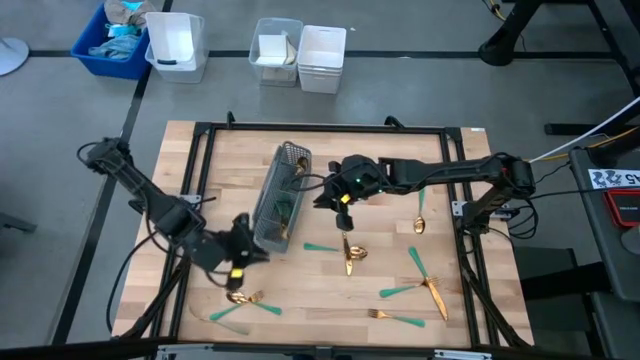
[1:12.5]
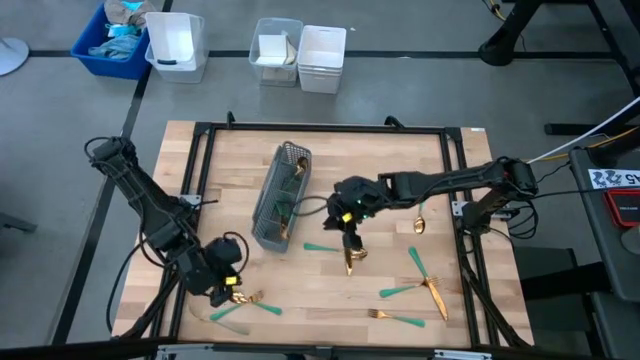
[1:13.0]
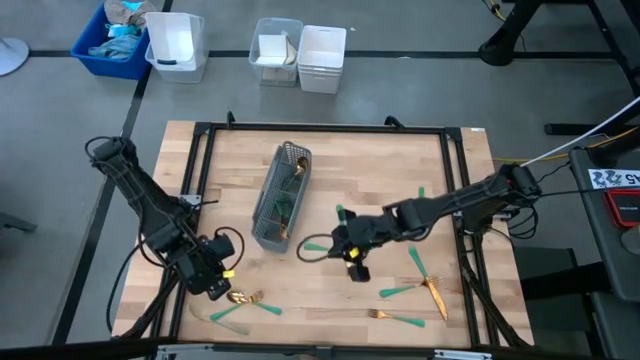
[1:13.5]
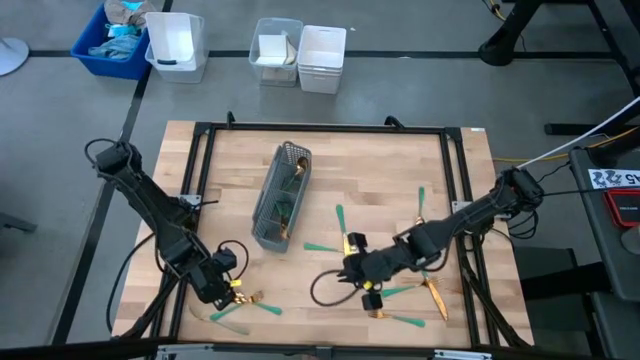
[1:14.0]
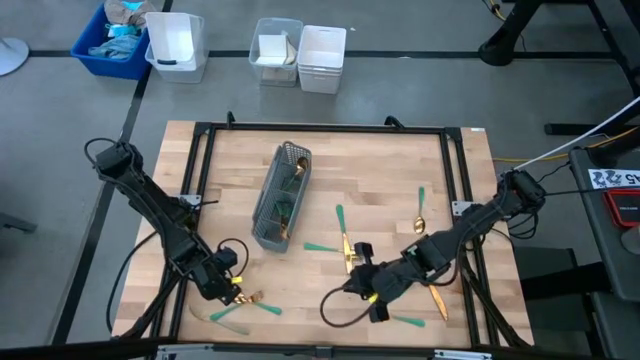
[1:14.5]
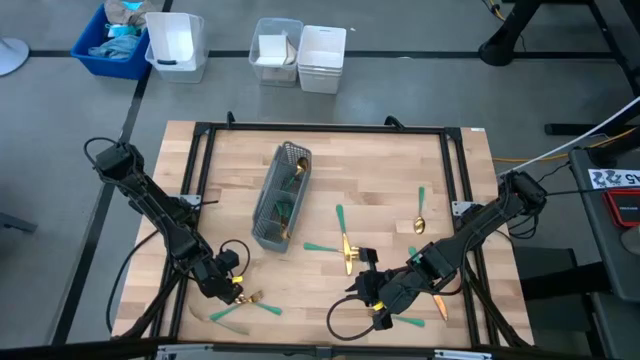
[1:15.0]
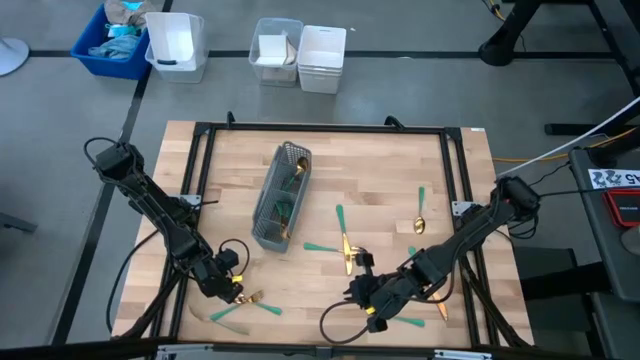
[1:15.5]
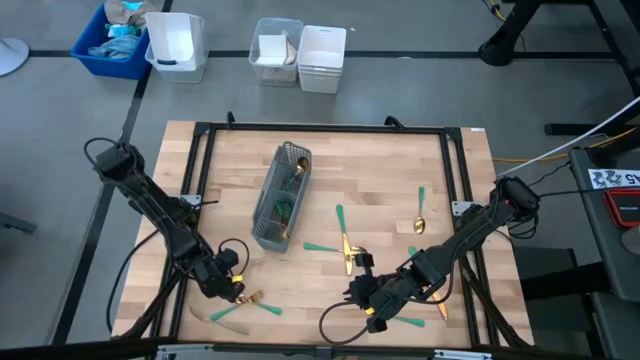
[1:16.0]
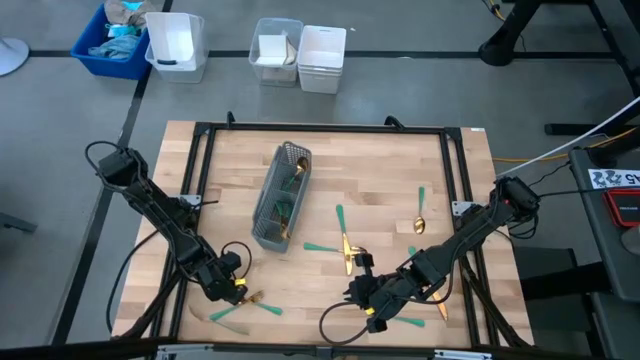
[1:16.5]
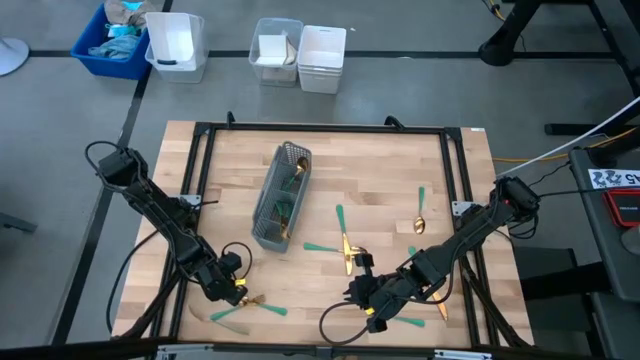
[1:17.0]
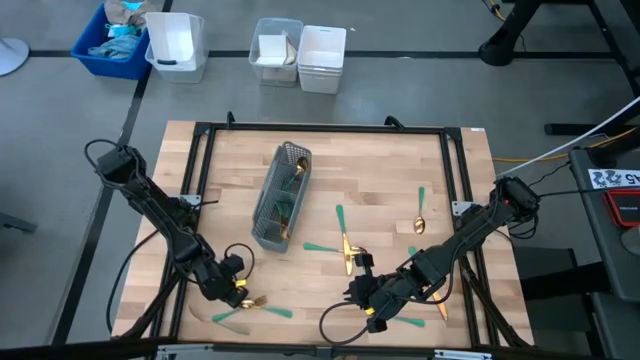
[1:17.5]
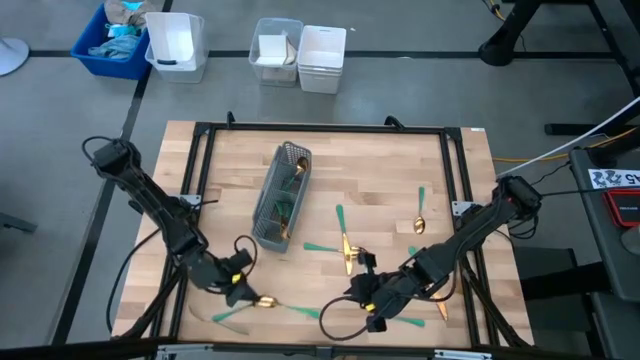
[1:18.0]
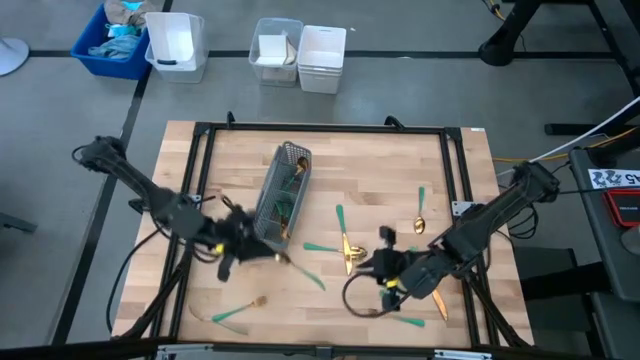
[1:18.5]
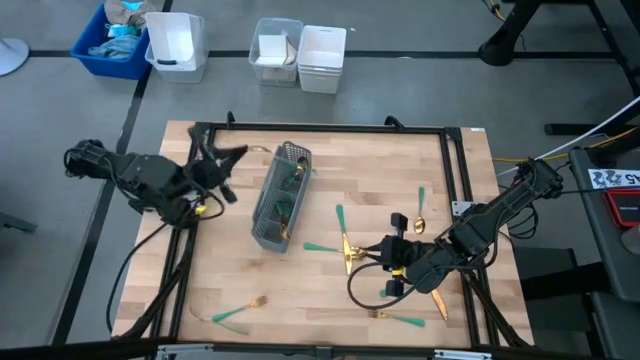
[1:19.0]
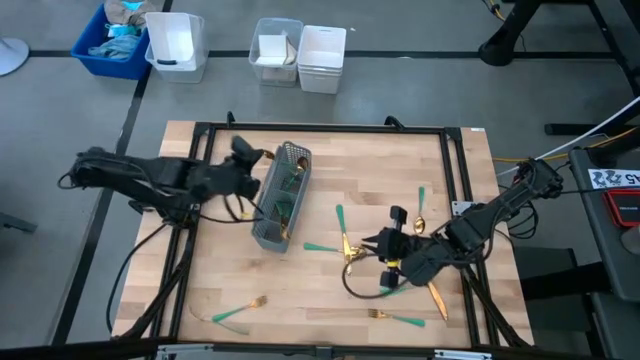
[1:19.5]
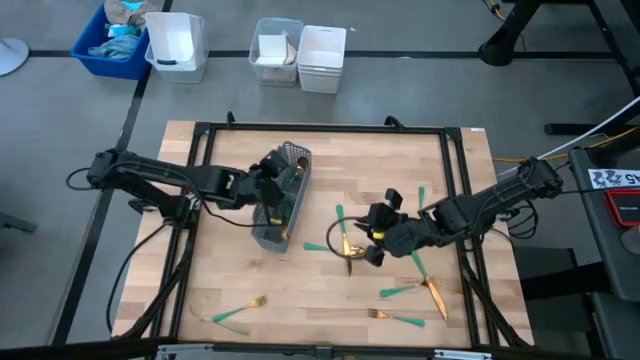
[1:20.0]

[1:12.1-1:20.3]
Task: Sort silverware
Put the green spoon into the gray silverware rack

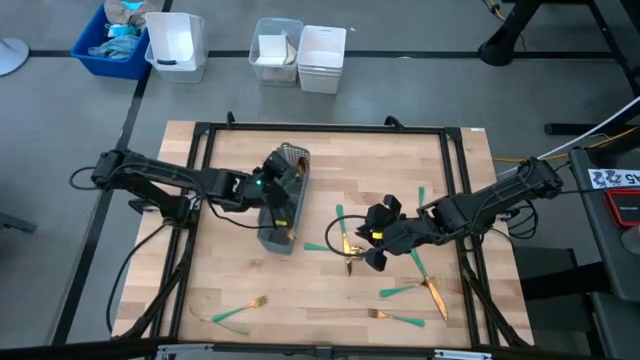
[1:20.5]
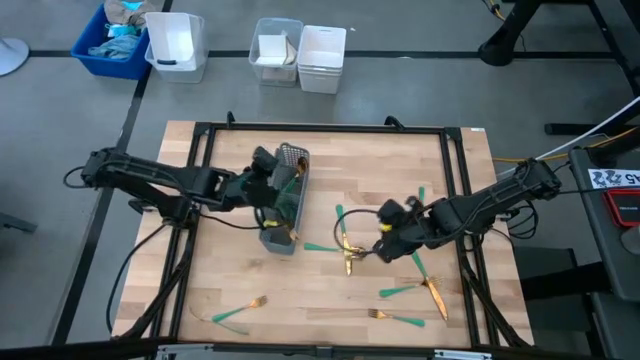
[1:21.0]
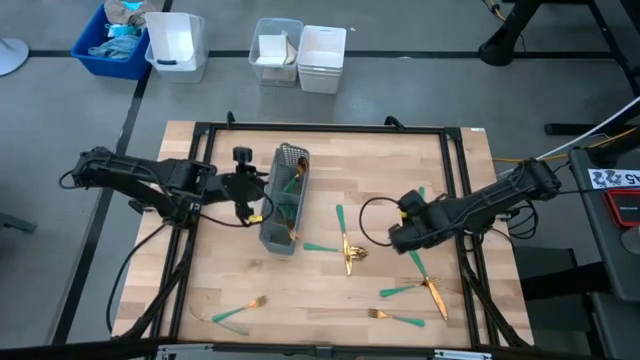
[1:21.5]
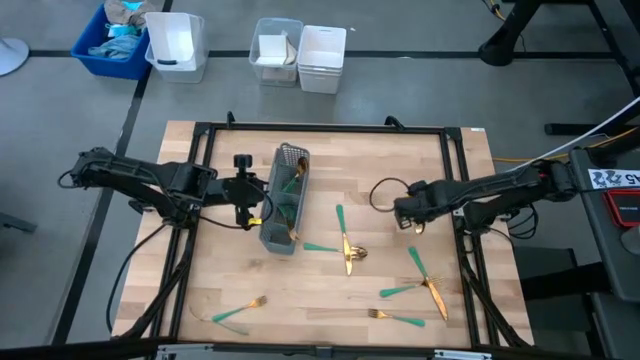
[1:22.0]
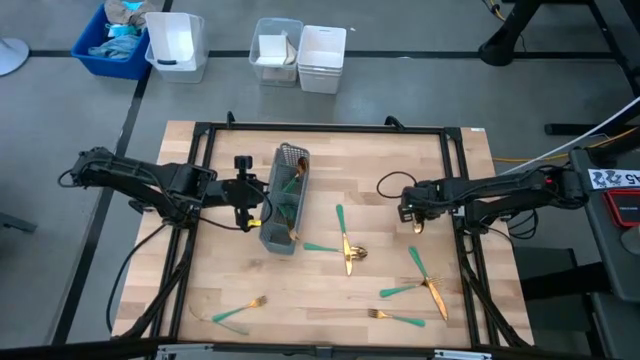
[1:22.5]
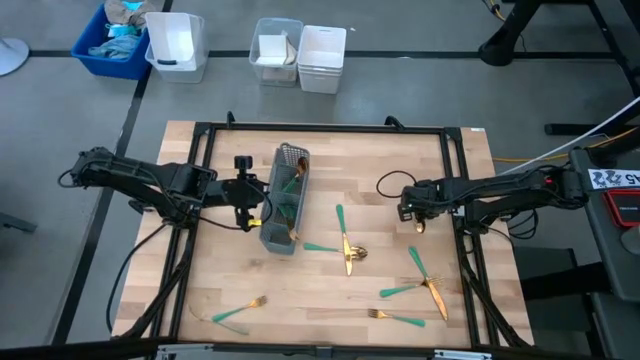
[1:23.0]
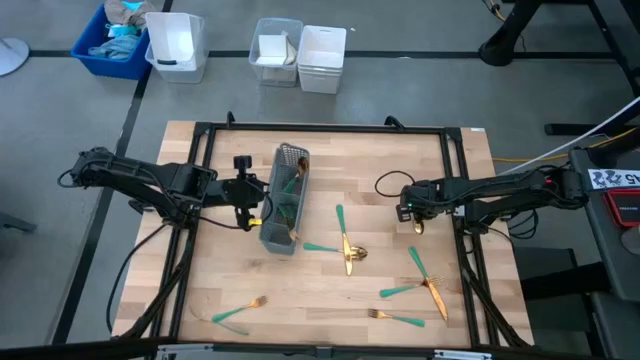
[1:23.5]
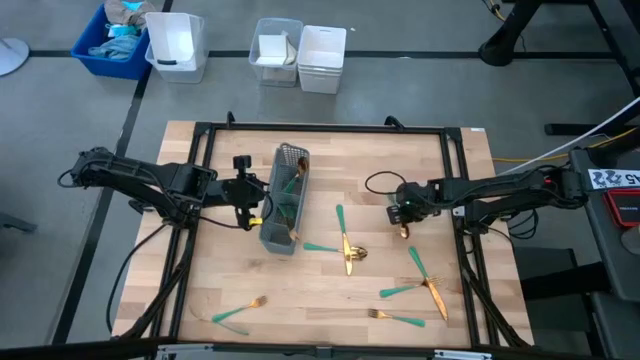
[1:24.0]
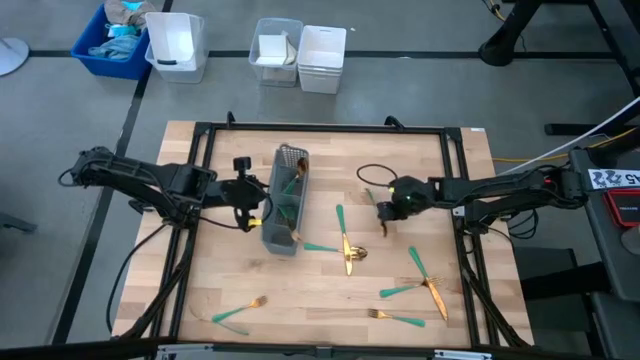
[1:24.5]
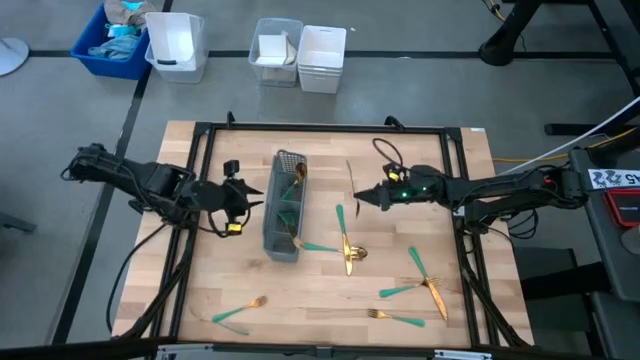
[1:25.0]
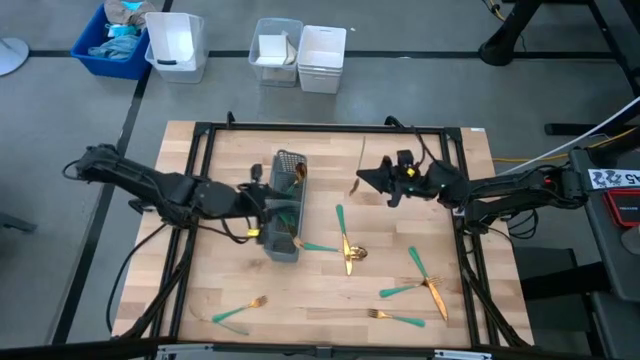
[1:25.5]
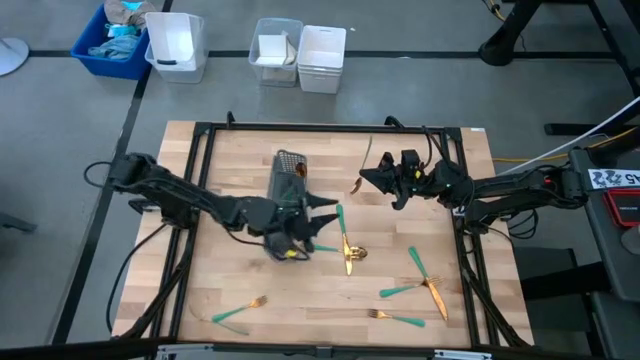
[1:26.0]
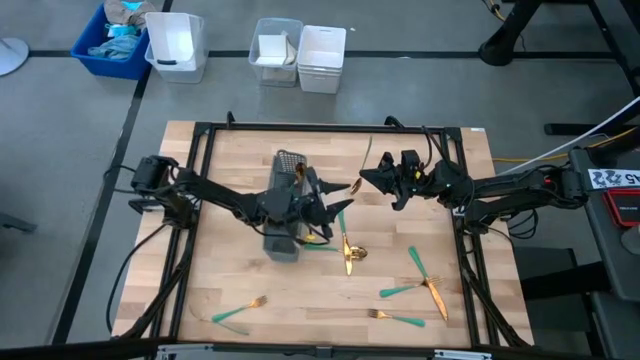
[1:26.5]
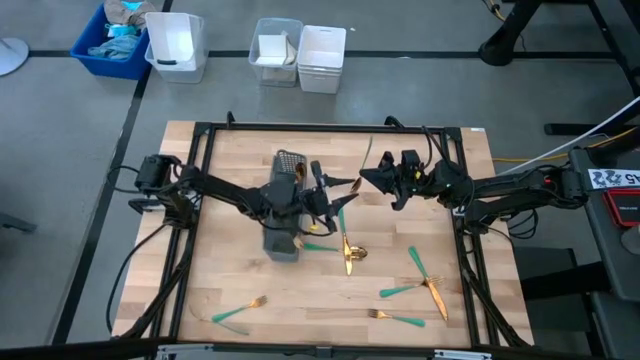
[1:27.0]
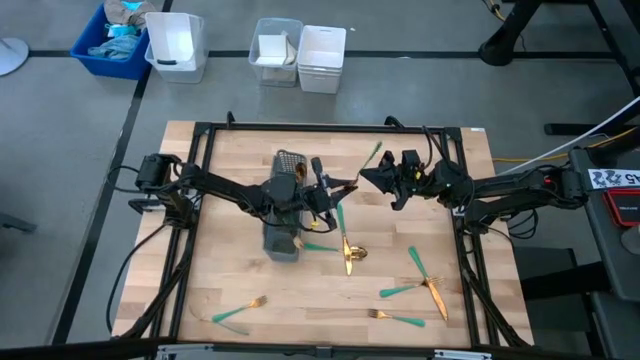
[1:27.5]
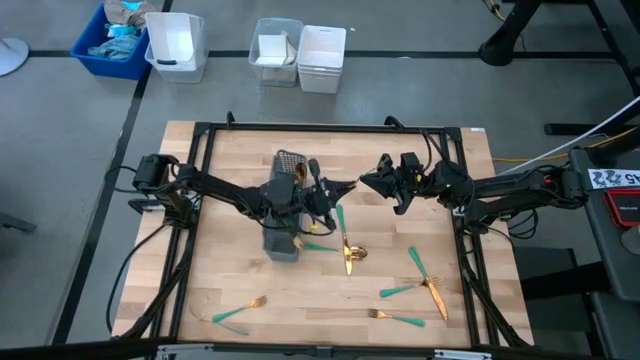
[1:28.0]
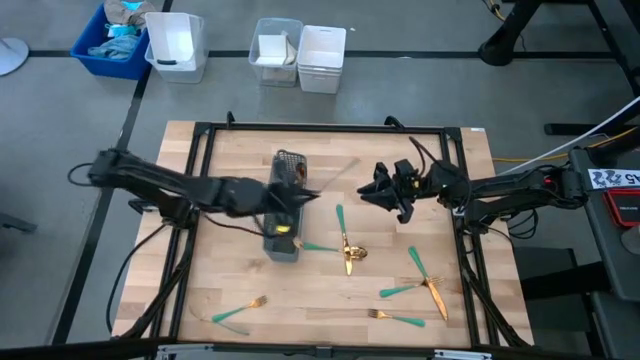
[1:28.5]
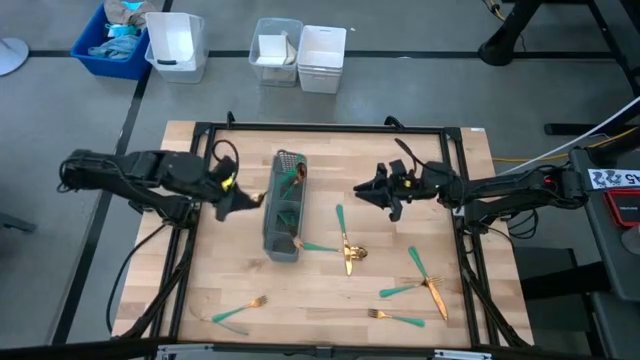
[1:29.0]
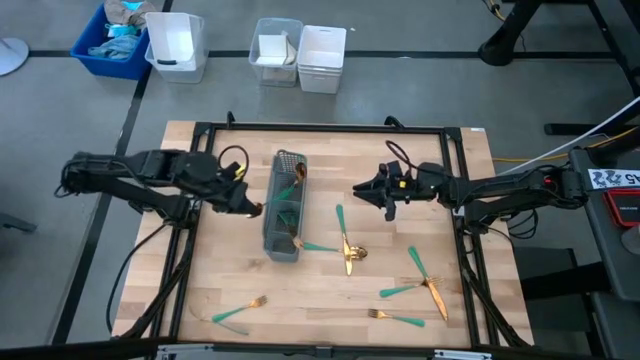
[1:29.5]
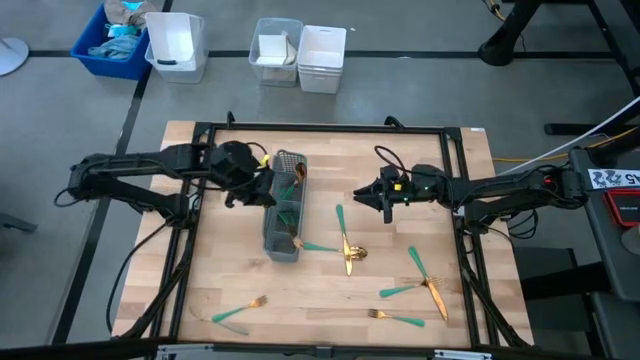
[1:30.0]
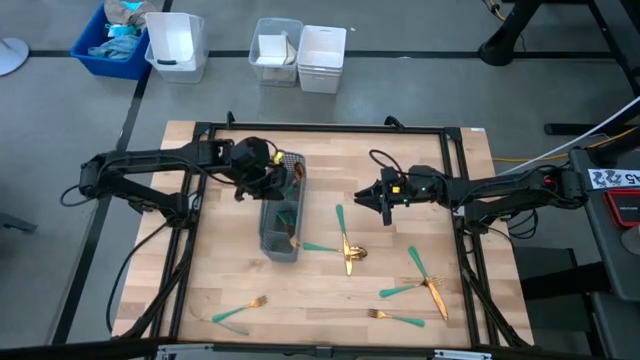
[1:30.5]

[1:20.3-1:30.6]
Put the green spoon into the gray silverware rack

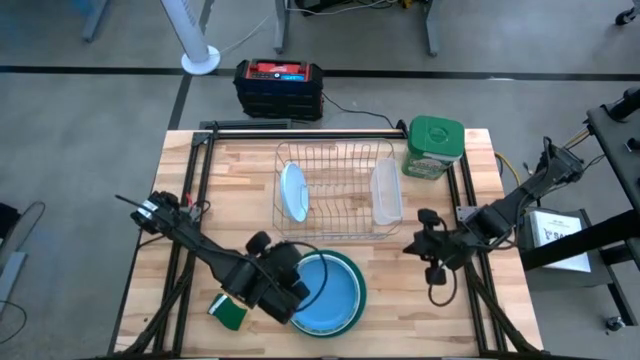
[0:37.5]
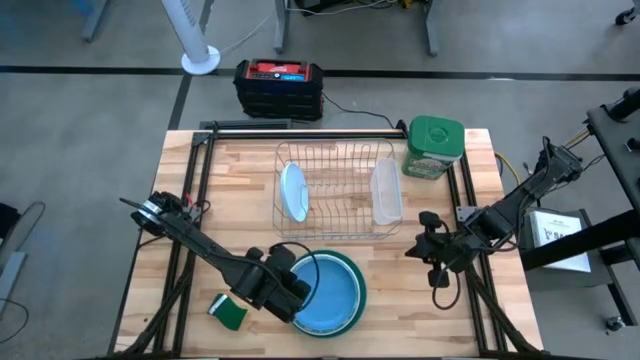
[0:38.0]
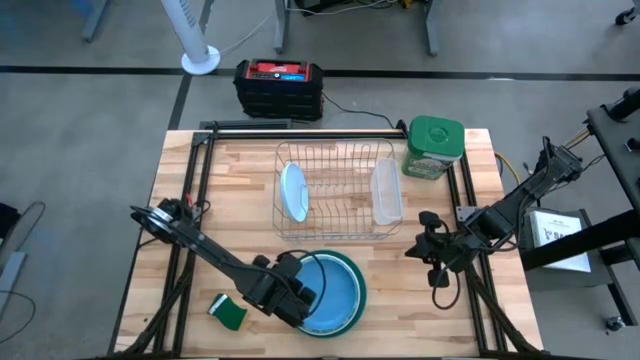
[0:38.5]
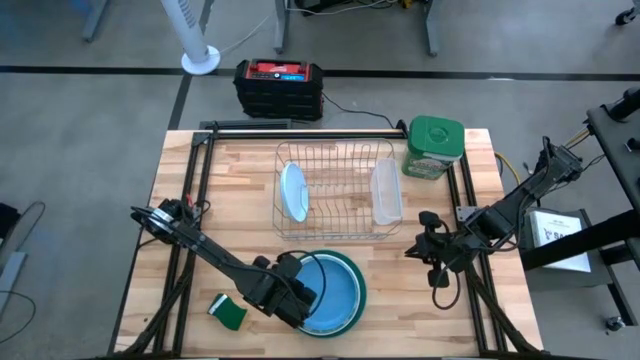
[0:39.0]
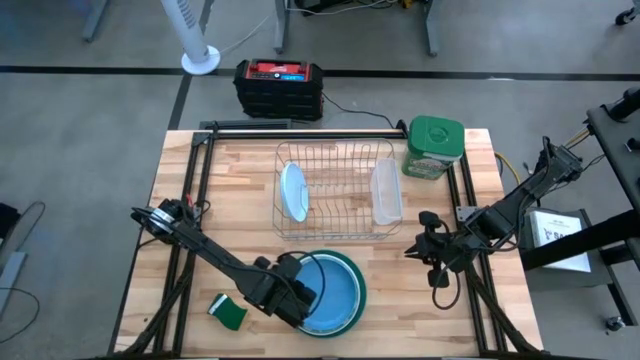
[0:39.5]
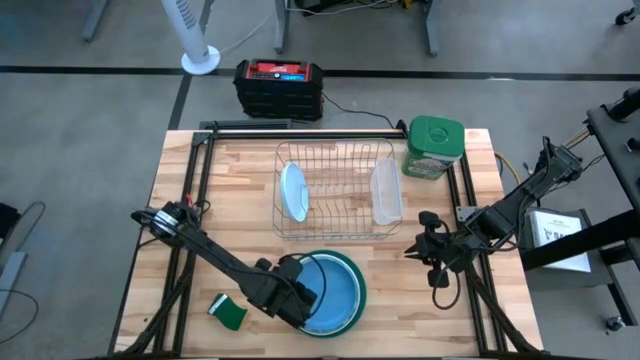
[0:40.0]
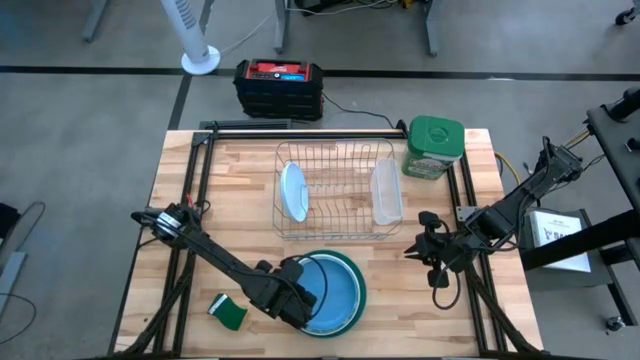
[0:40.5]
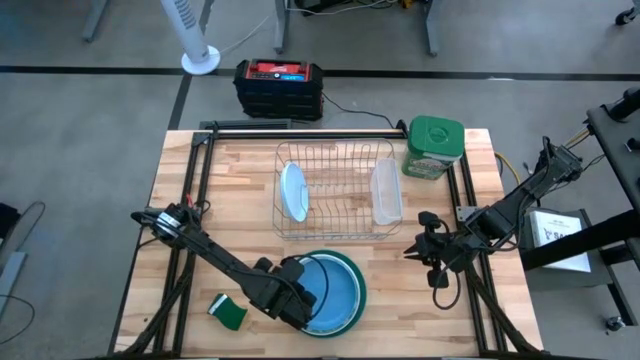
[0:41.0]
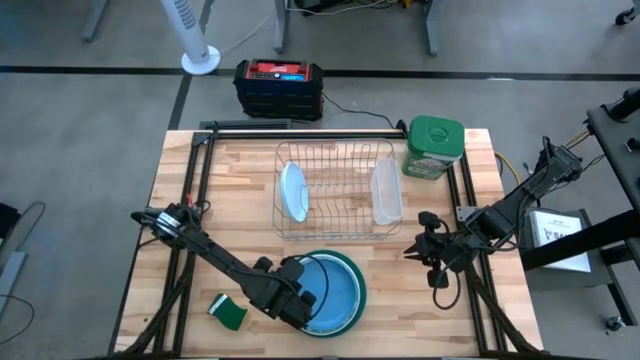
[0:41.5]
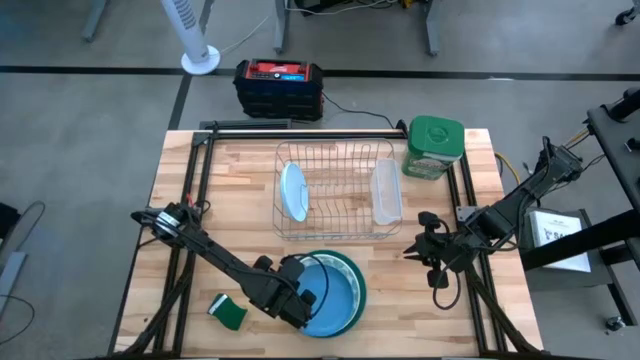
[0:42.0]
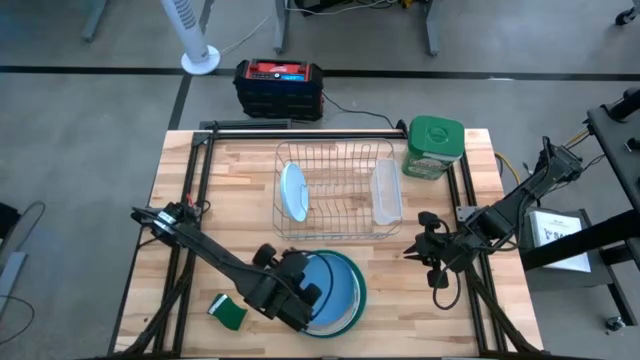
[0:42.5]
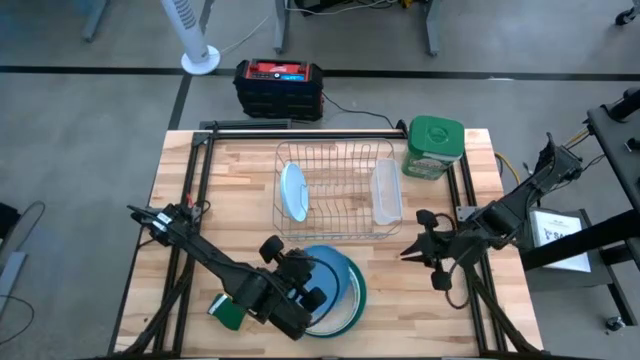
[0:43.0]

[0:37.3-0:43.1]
Task: Sort dishes
Put the blue plate in the dish rack
